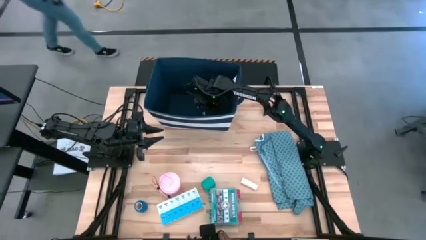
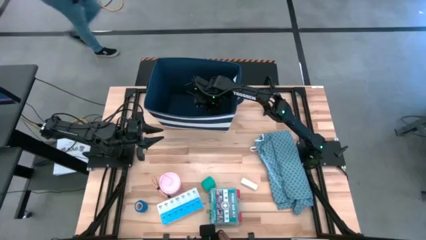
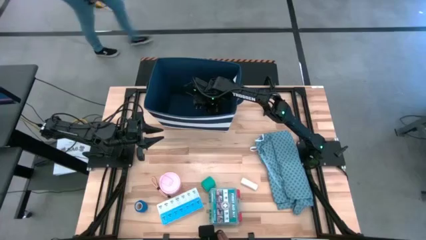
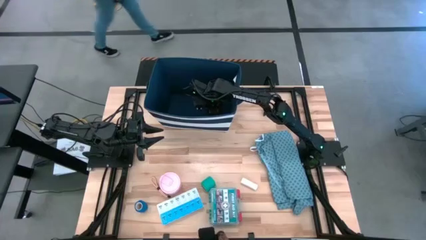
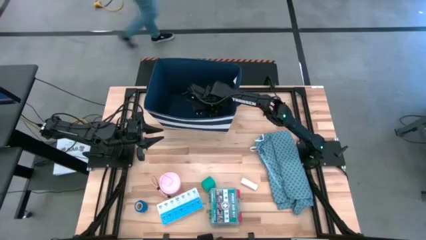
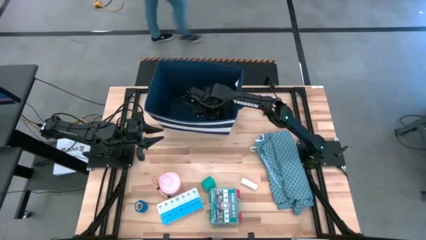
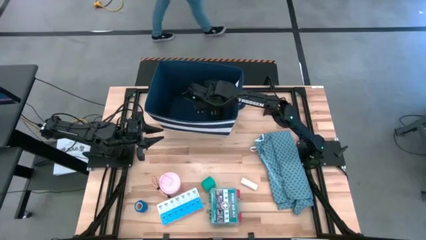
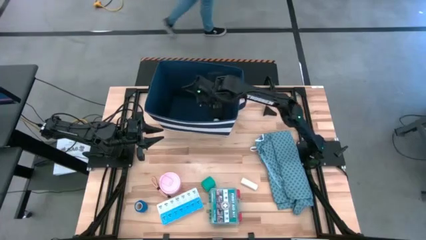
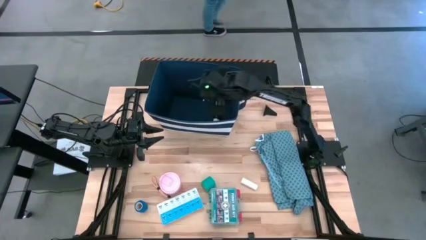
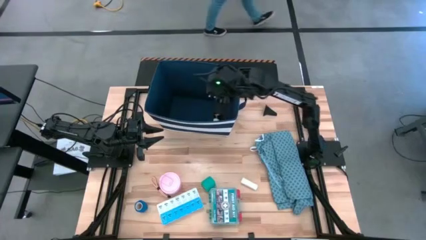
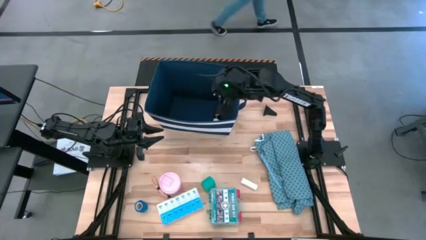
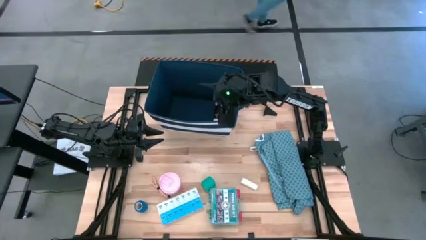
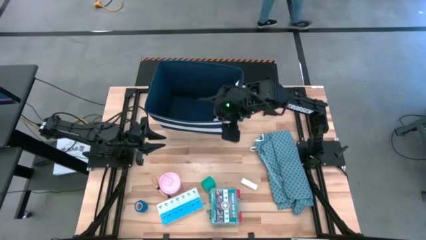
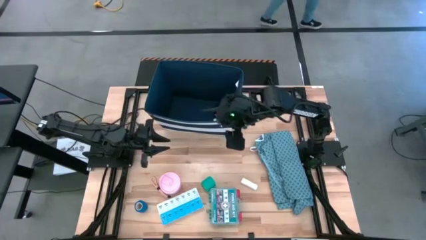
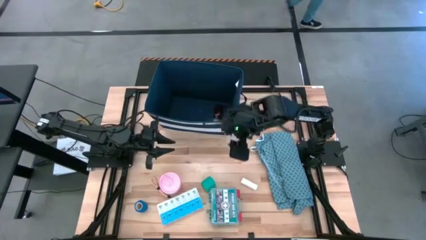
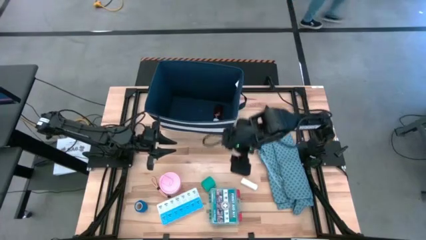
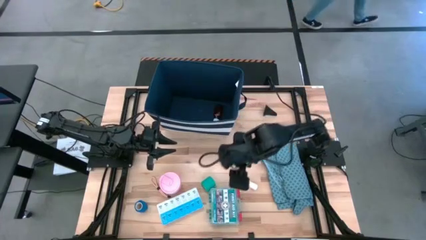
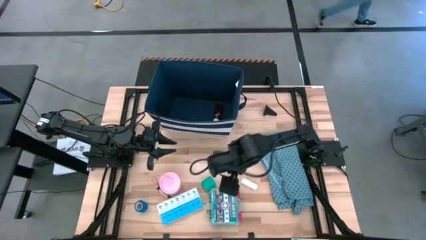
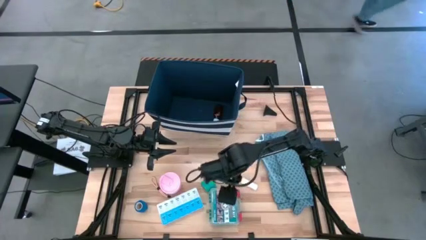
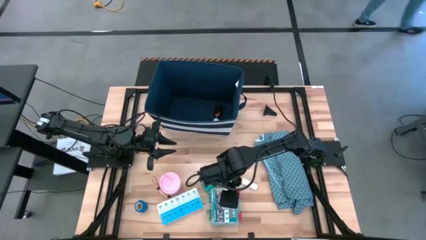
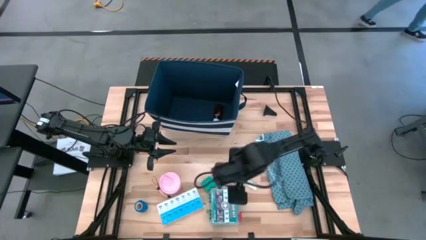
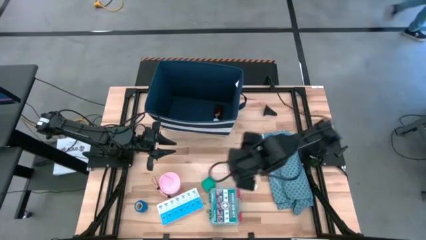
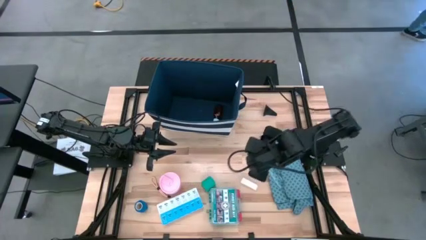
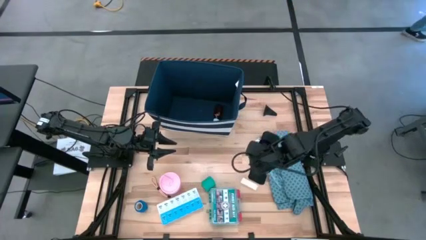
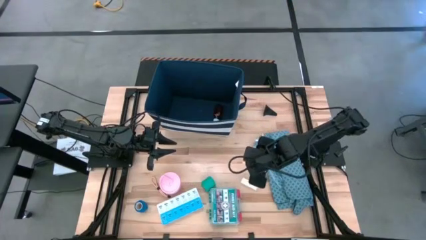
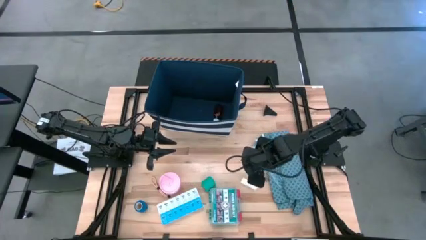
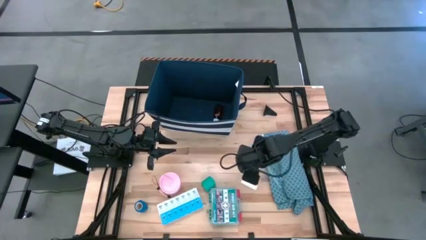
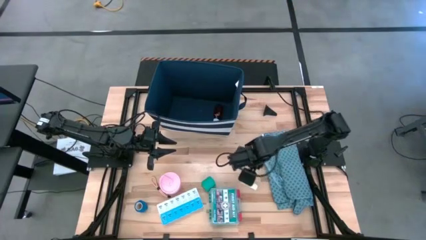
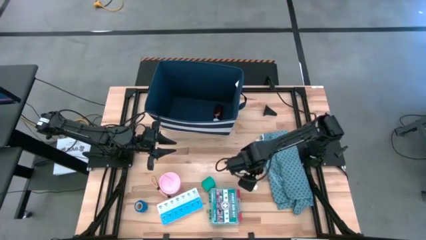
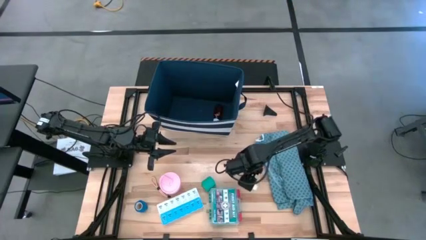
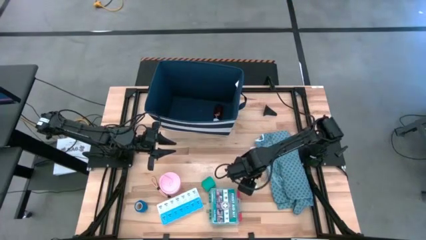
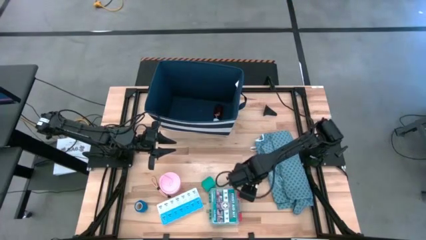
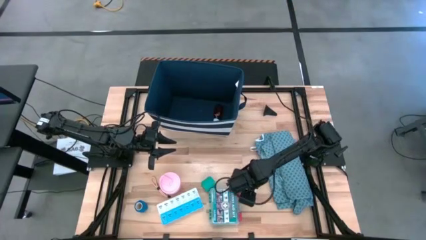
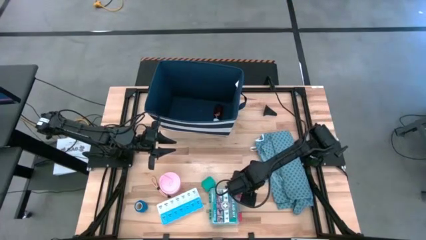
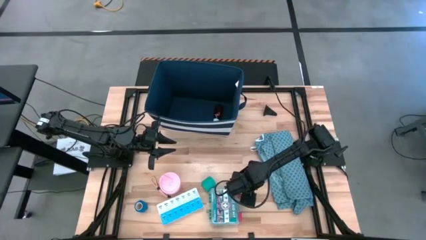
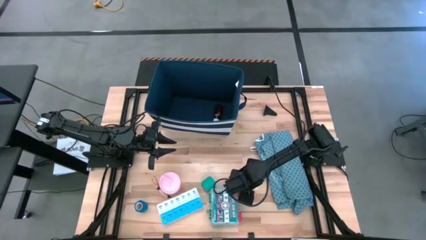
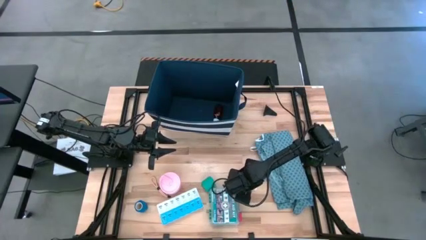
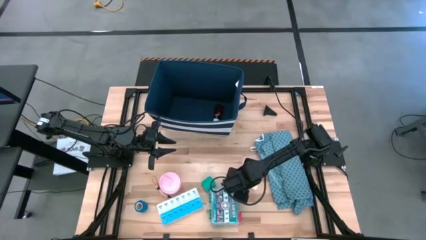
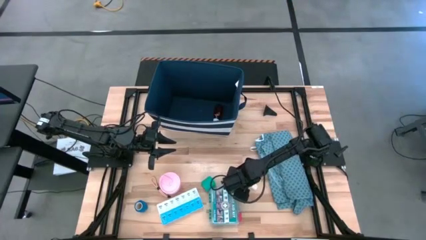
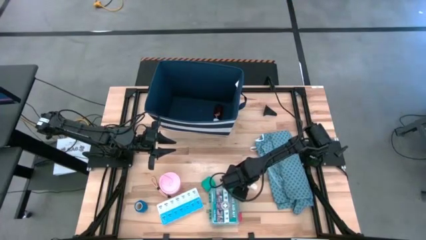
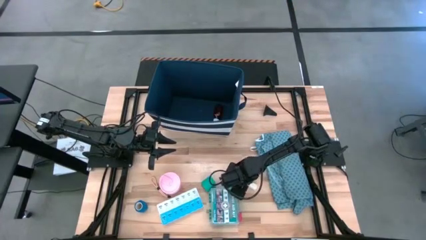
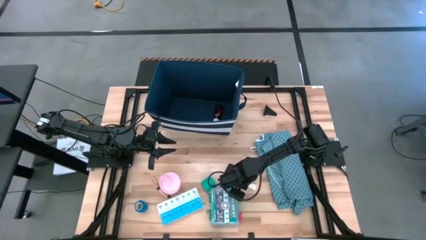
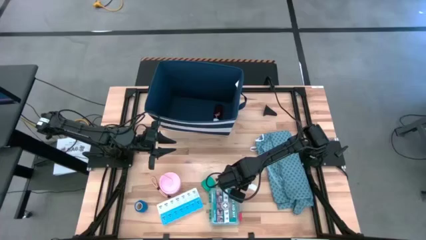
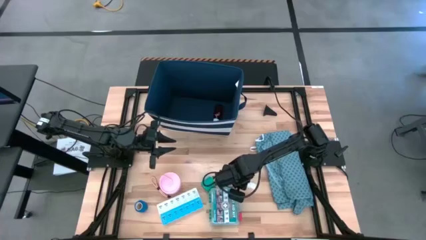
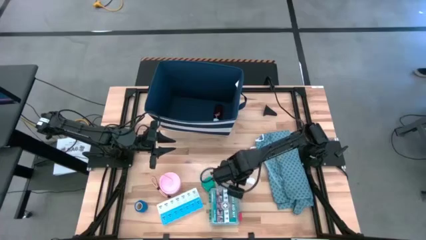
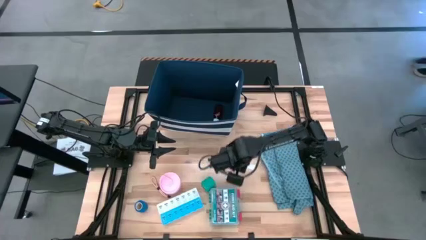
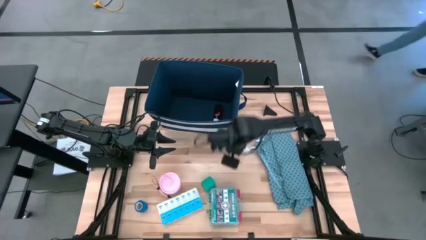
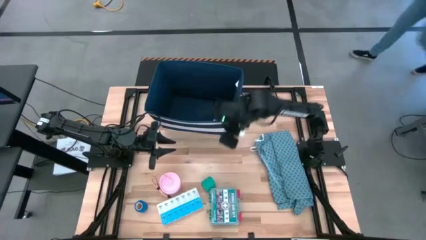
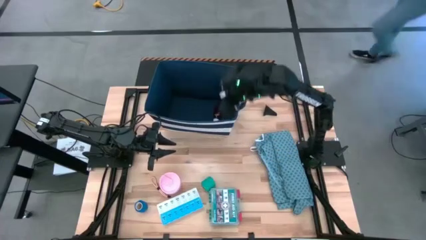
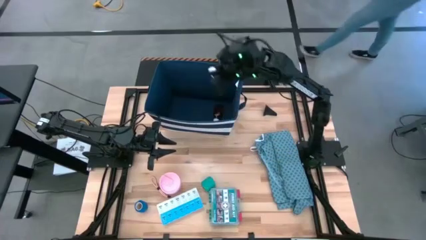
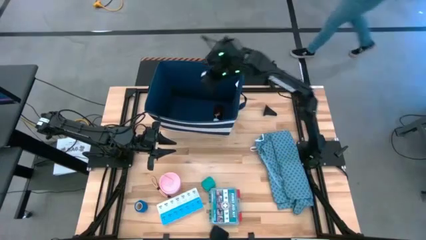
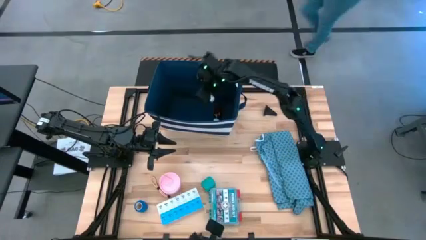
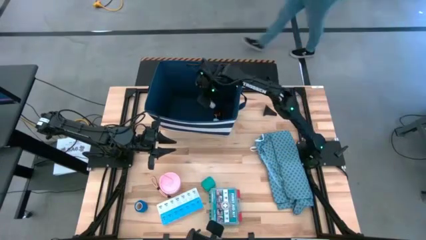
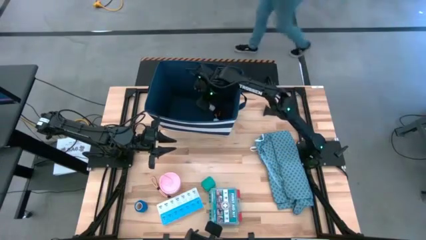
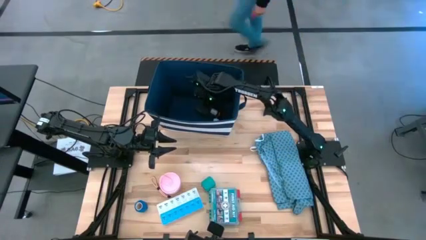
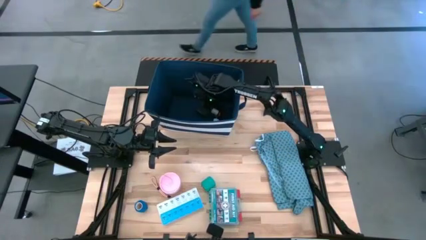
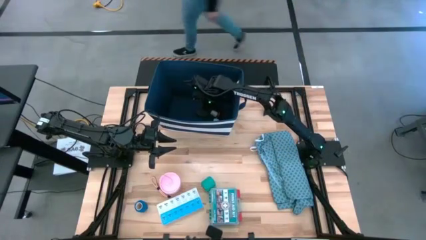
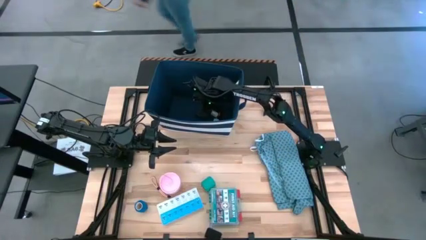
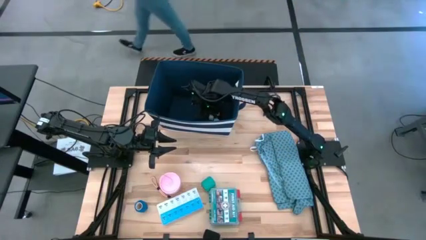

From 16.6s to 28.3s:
Task: Pick & place medical supplies in basket/bin
Put the white rolled gauze into the laundry organizer

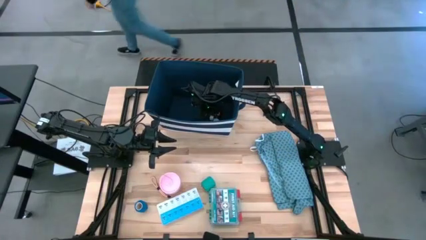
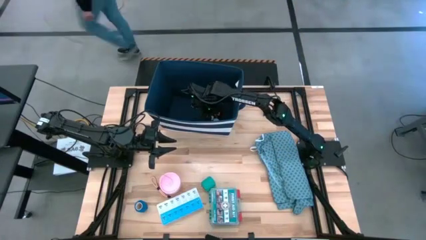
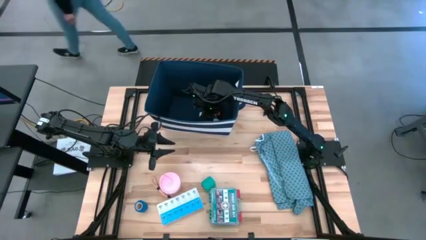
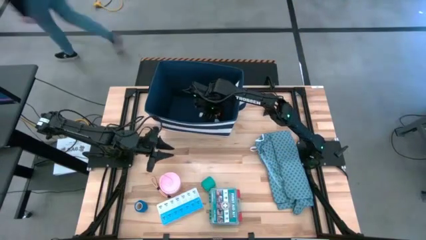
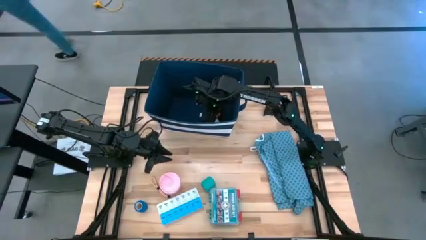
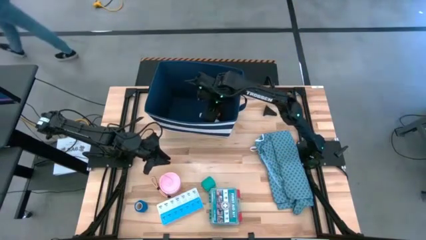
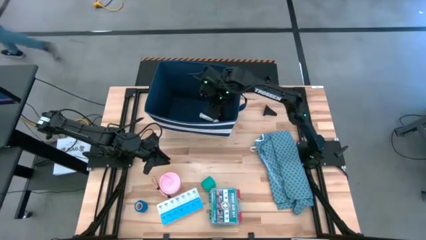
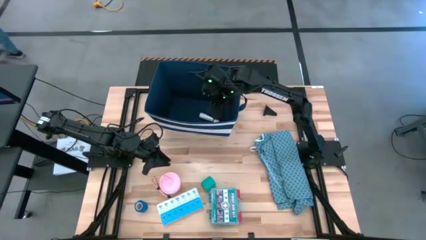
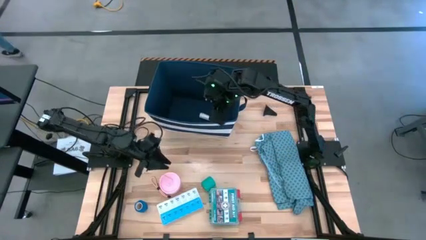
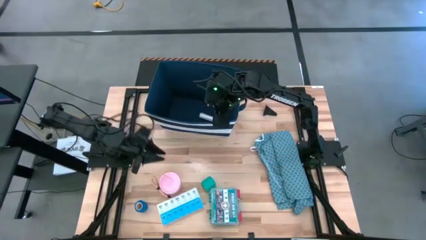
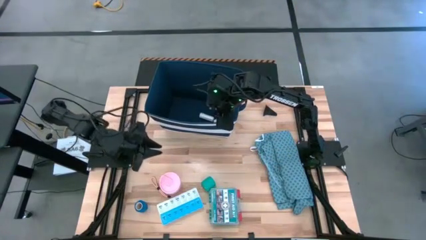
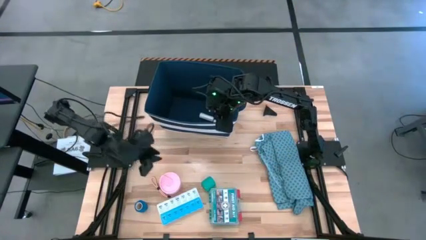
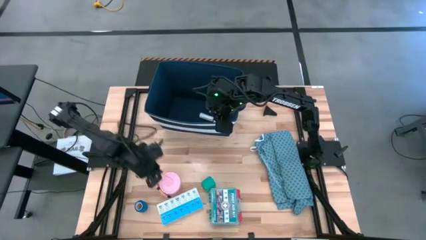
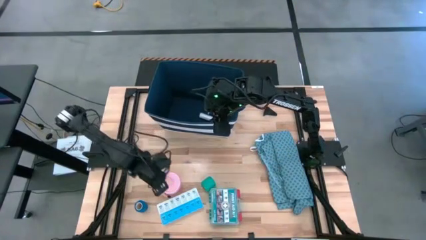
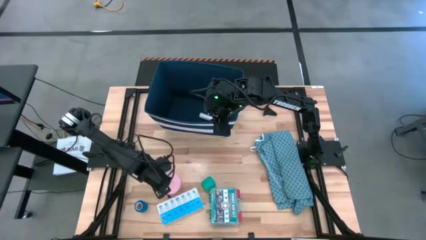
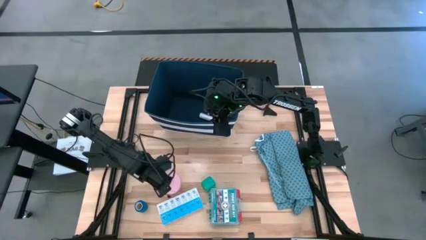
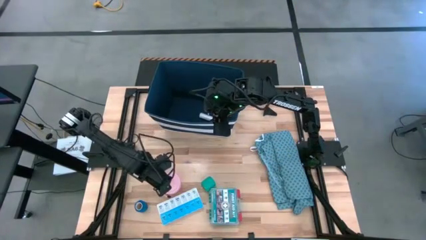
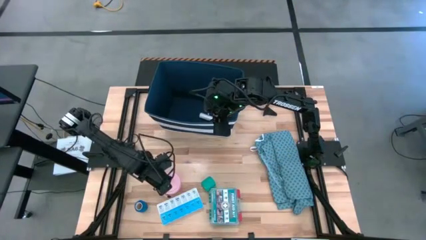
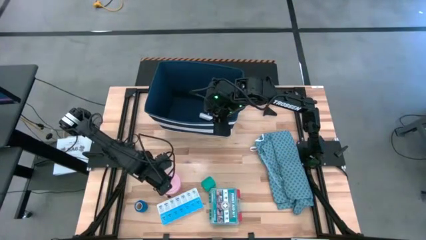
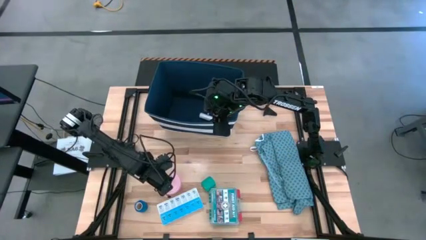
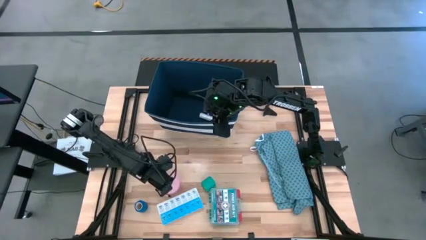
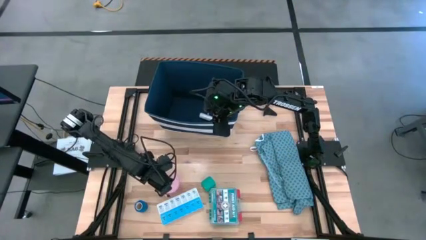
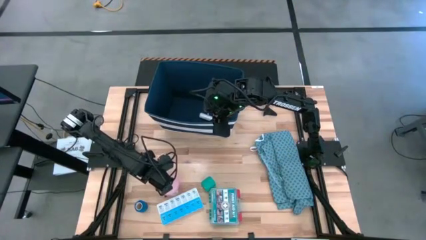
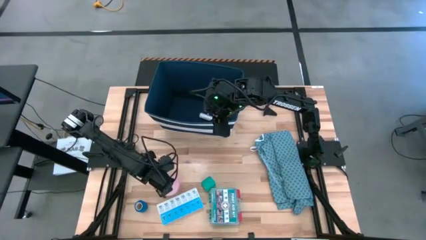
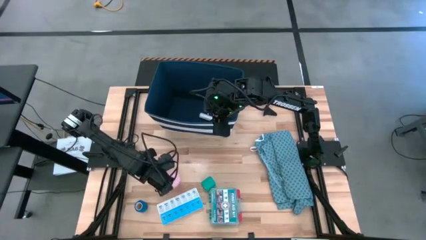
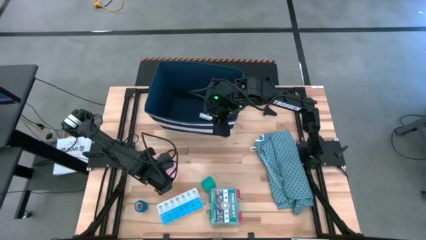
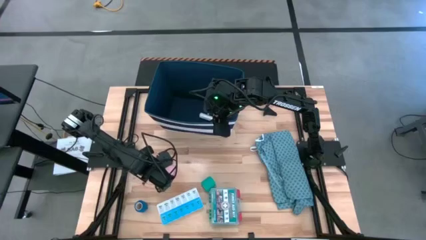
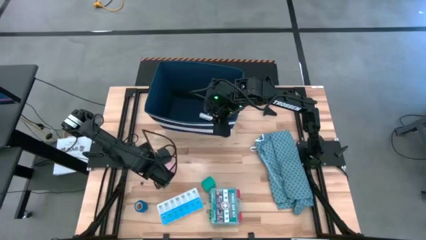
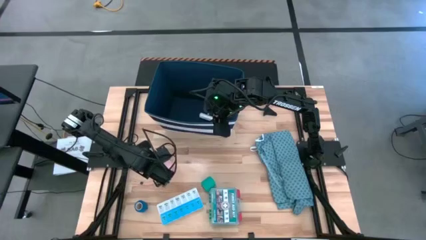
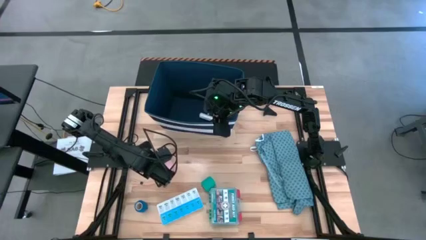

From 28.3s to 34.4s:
Put the pink tumbler into the laundry organizer
